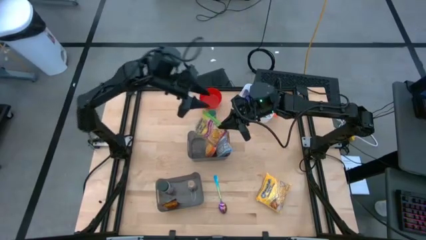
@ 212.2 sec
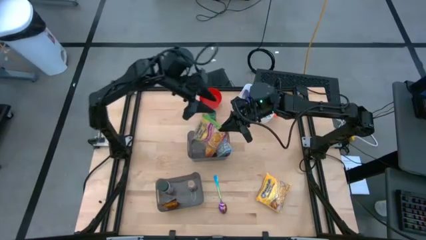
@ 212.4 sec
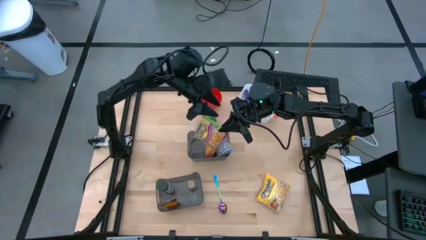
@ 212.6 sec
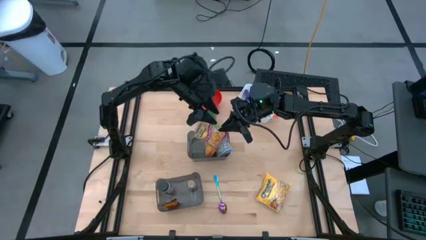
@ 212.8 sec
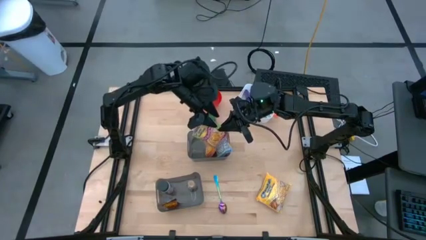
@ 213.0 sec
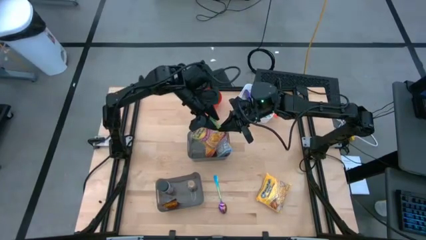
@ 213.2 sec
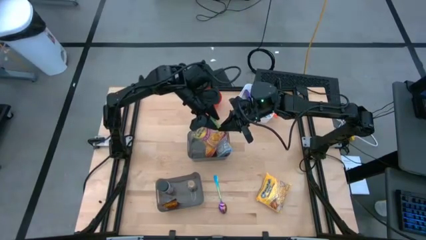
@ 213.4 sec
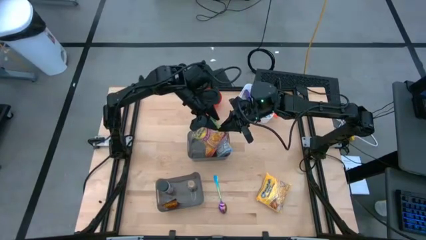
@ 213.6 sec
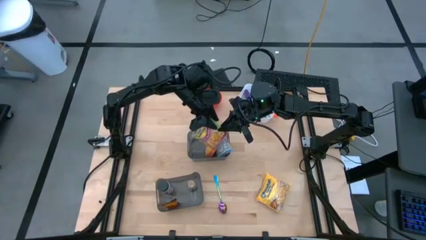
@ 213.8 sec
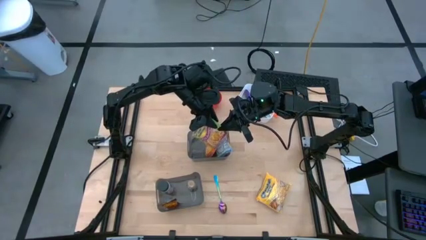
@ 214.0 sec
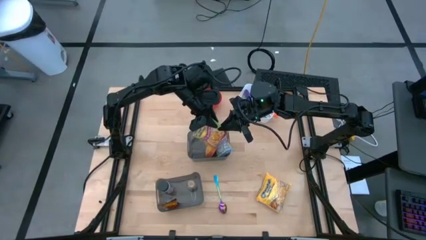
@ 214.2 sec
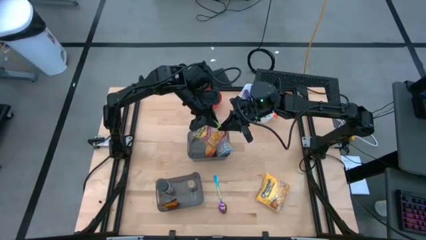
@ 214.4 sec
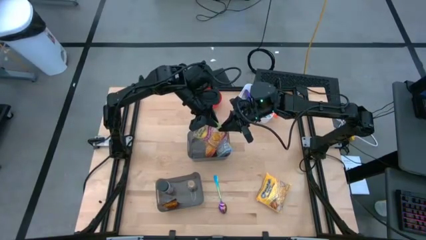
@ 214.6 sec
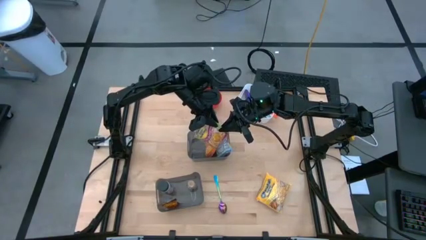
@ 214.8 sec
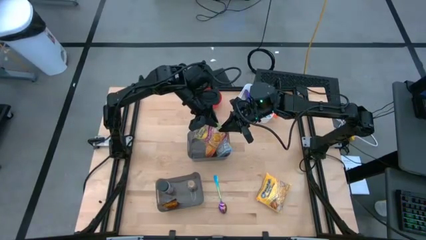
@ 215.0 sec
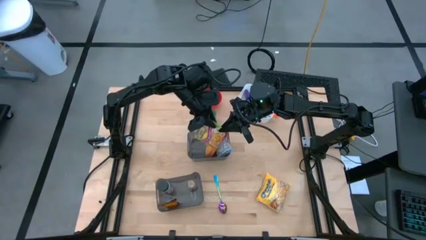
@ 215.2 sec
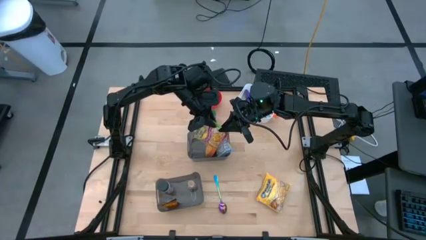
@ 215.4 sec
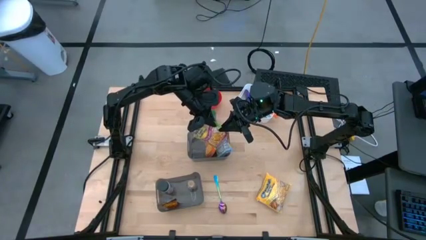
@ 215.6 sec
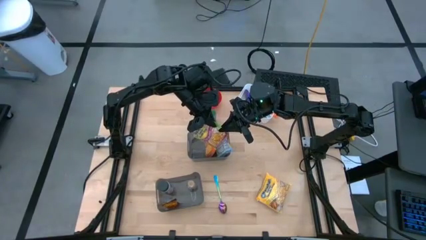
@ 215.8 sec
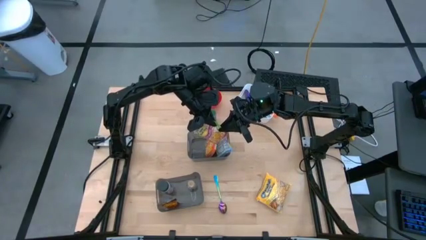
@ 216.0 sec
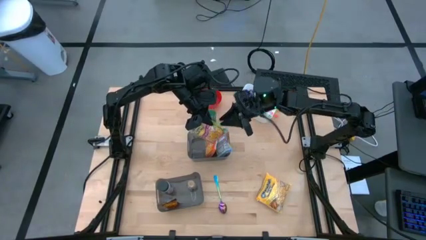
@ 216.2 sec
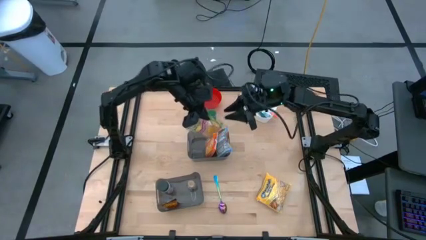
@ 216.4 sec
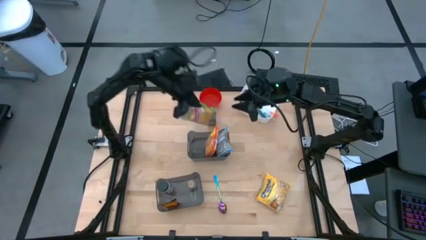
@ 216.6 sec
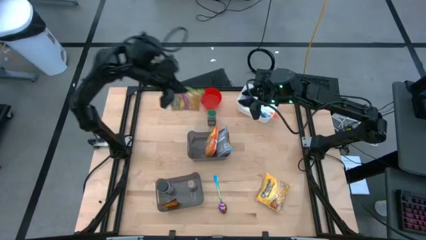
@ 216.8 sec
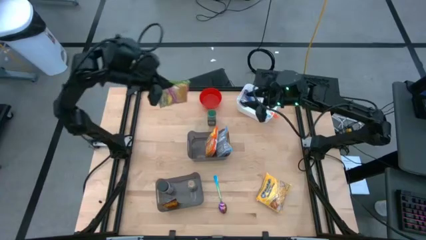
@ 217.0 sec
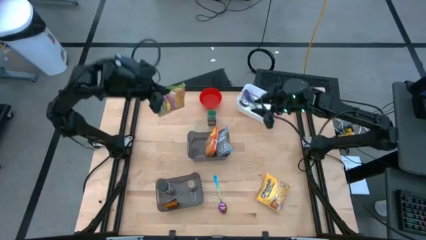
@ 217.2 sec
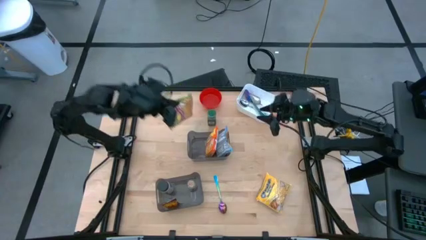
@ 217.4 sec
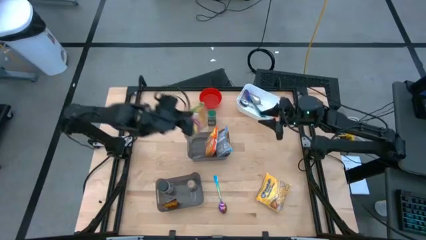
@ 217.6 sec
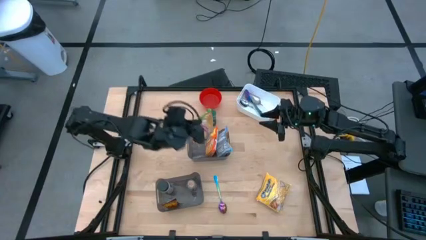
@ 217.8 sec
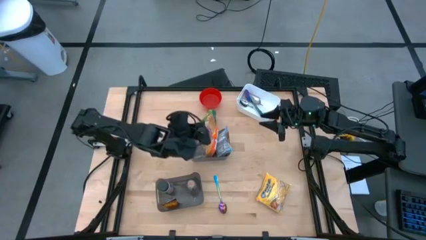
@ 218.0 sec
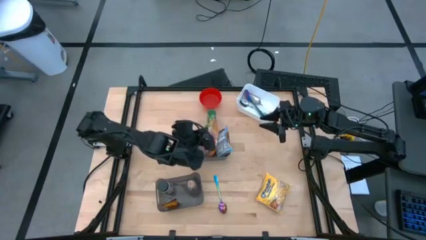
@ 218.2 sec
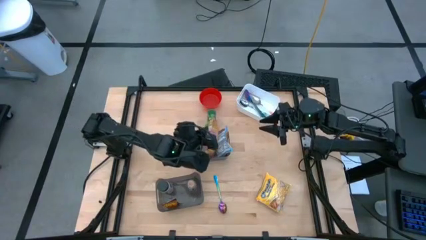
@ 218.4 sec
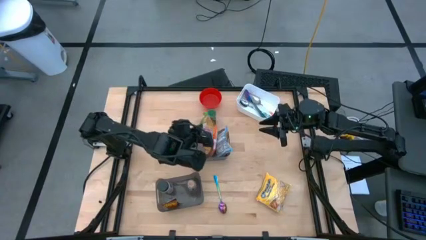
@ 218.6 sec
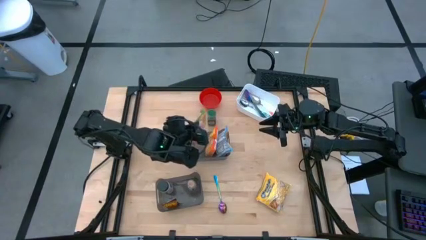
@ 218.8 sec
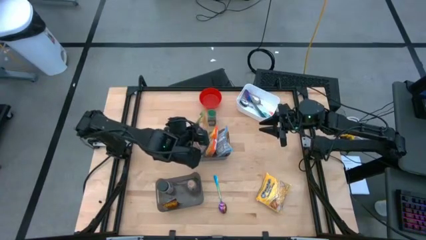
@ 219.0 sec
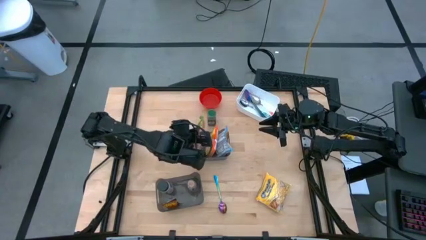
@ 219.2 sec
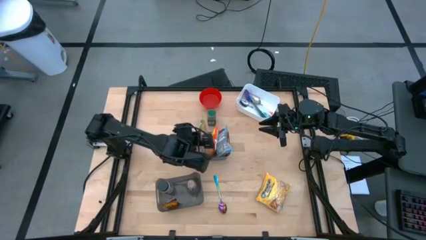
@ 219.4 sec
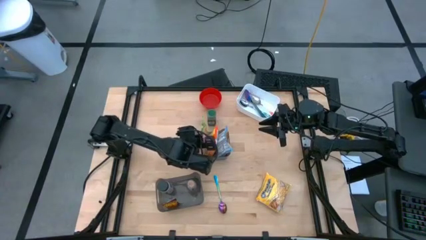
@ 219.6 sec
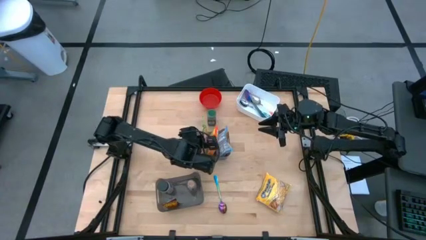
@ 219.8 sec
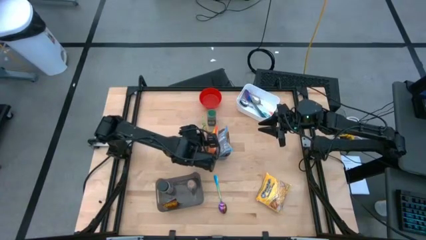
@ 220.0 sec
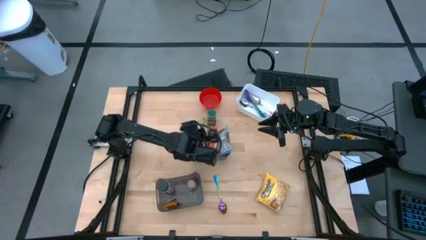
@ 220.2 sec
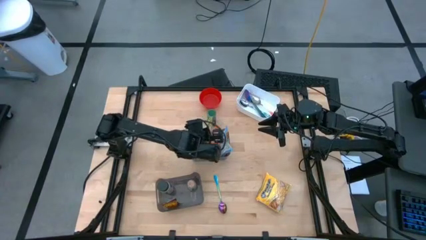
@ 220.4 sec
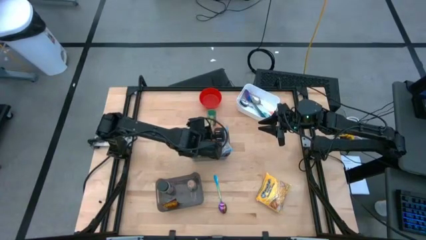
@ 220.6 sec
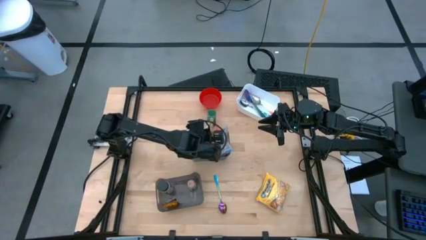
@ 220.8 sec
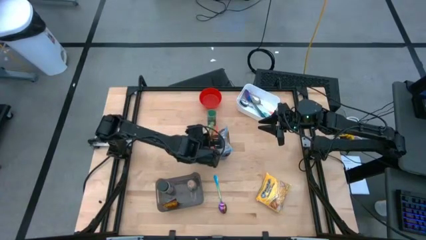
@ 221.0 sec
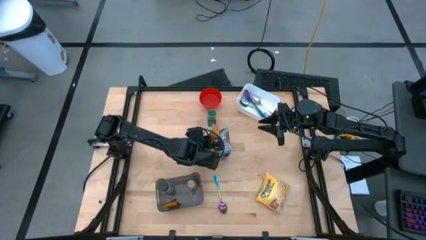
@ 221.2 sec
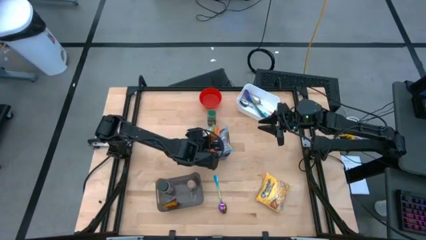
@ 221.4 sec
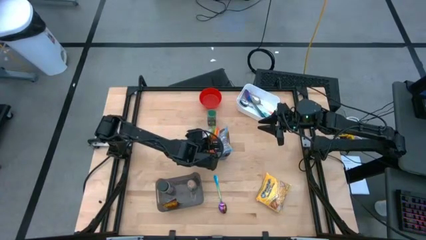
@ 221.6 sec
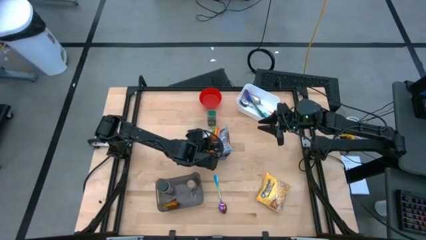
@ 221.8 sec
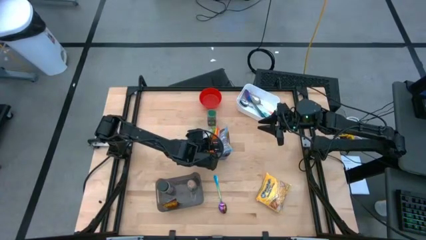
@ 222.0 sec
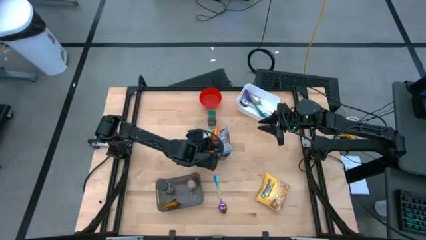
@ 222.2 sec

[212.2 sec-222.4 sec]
Task: Pick & Place Food Item
Put the green noodle pack into the top black bin

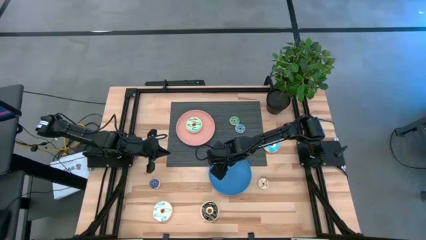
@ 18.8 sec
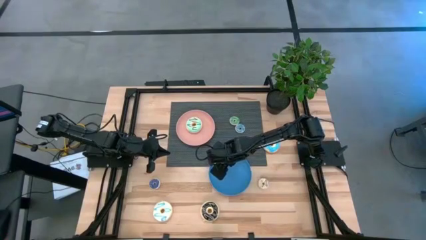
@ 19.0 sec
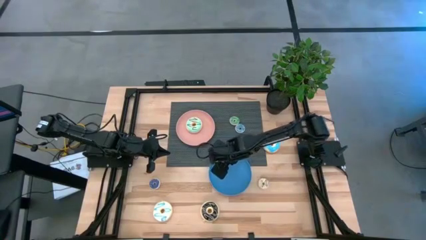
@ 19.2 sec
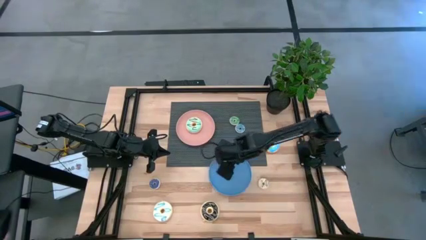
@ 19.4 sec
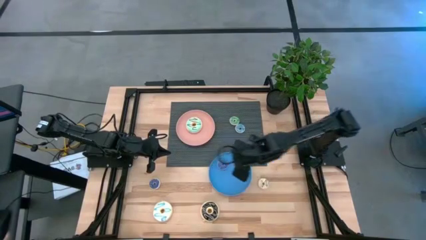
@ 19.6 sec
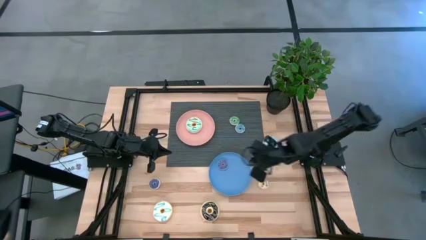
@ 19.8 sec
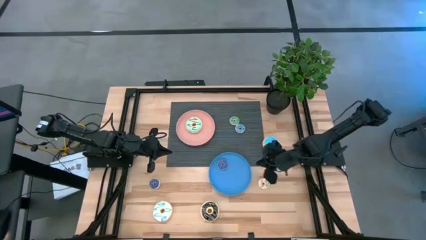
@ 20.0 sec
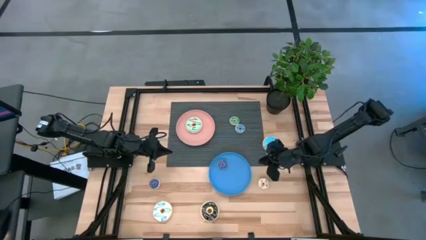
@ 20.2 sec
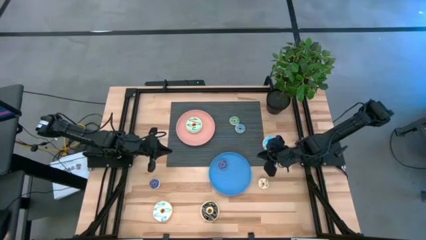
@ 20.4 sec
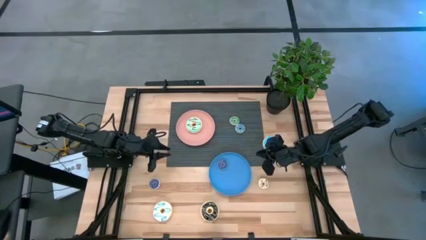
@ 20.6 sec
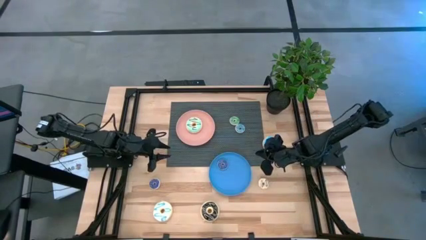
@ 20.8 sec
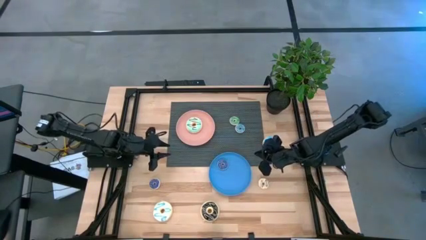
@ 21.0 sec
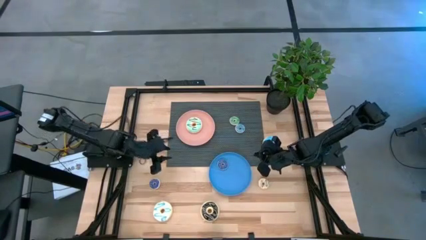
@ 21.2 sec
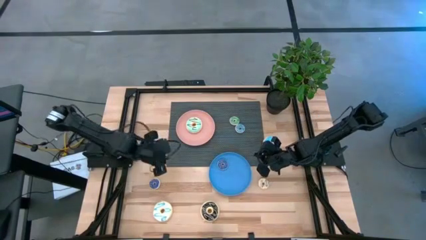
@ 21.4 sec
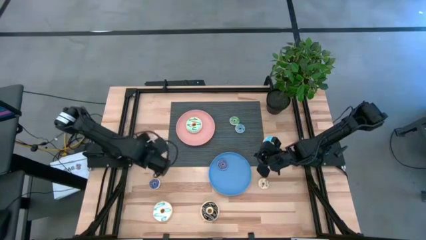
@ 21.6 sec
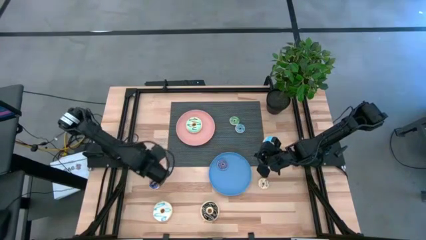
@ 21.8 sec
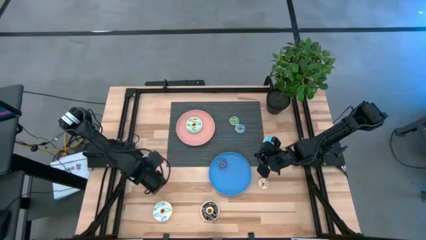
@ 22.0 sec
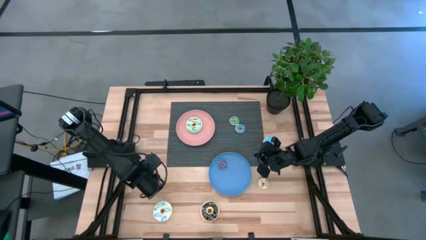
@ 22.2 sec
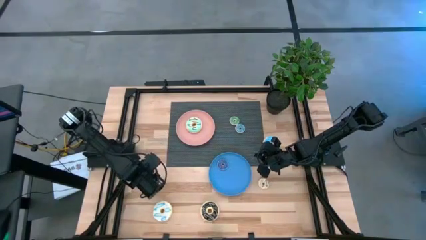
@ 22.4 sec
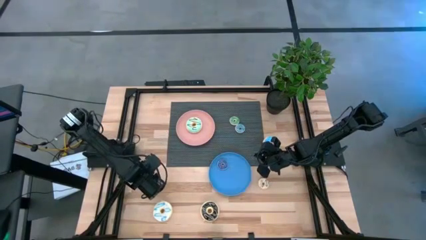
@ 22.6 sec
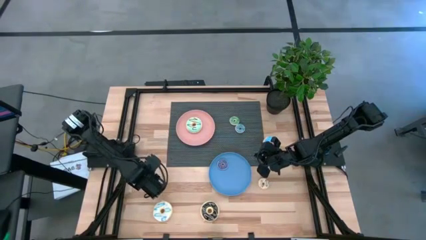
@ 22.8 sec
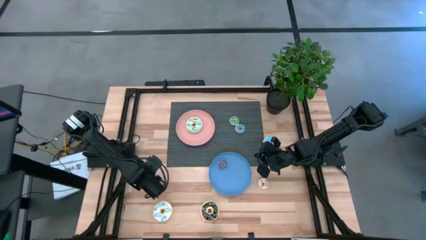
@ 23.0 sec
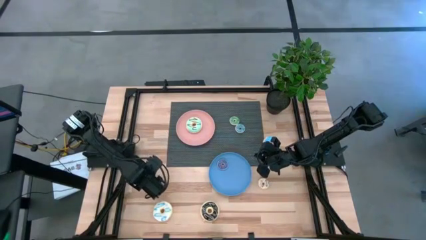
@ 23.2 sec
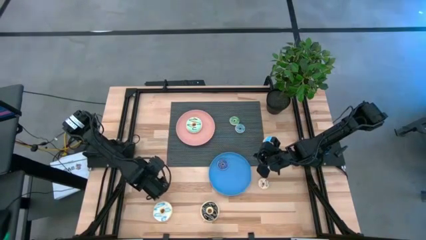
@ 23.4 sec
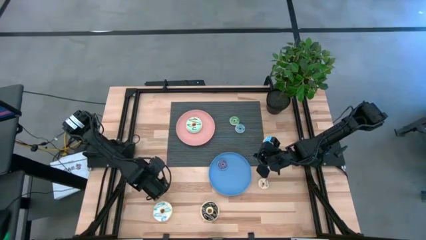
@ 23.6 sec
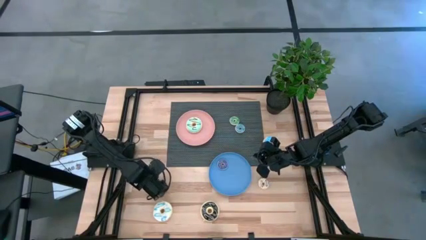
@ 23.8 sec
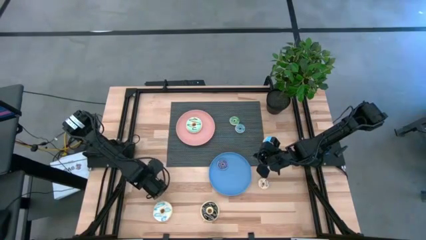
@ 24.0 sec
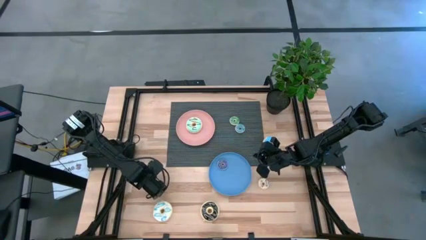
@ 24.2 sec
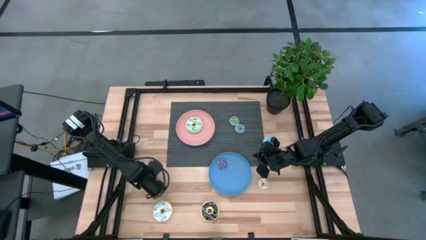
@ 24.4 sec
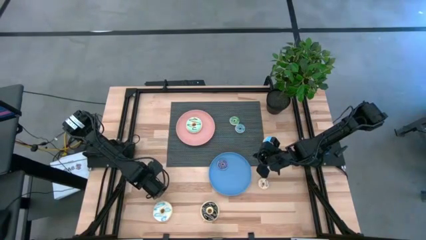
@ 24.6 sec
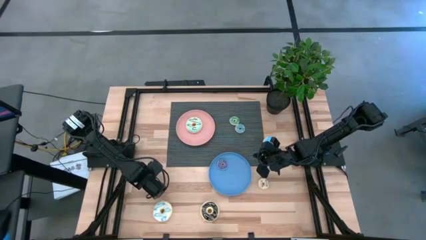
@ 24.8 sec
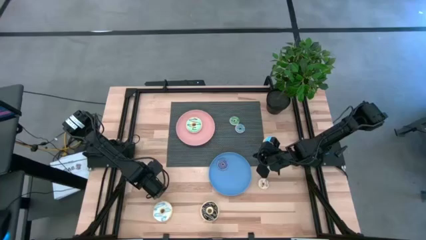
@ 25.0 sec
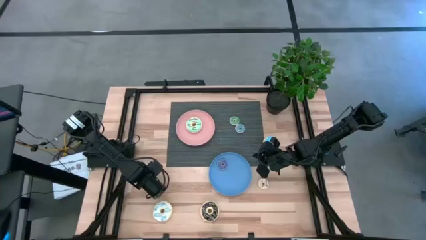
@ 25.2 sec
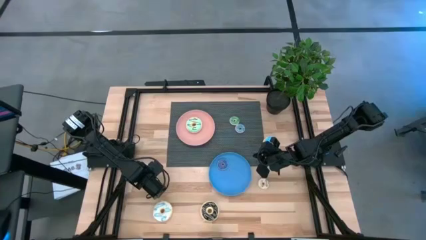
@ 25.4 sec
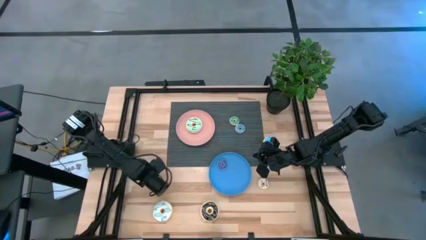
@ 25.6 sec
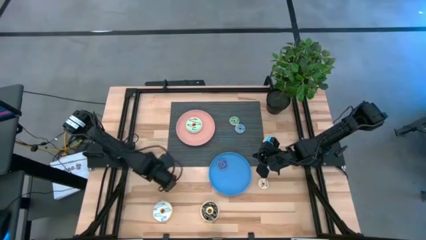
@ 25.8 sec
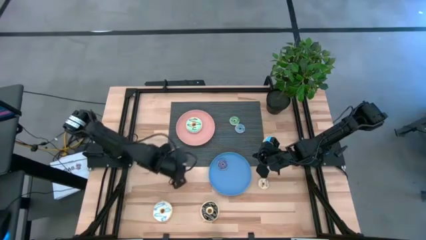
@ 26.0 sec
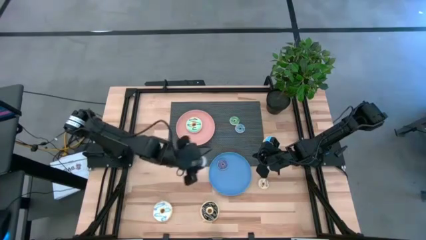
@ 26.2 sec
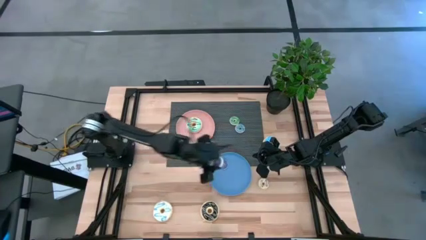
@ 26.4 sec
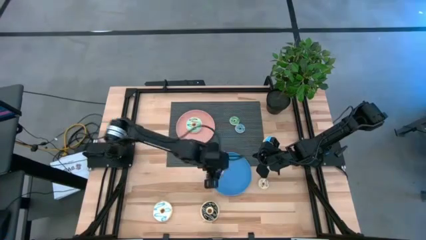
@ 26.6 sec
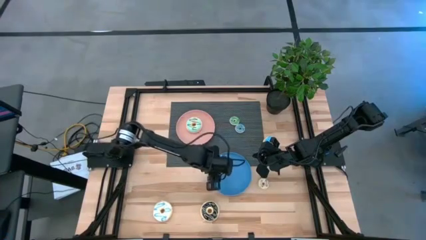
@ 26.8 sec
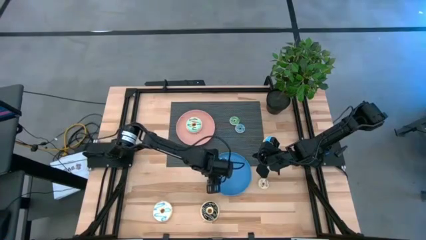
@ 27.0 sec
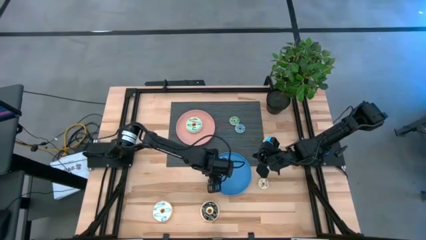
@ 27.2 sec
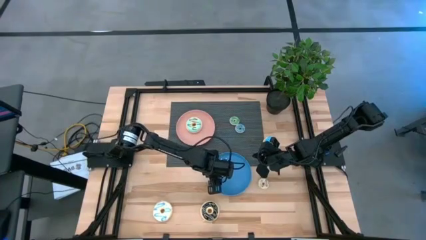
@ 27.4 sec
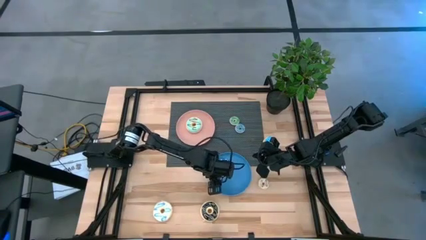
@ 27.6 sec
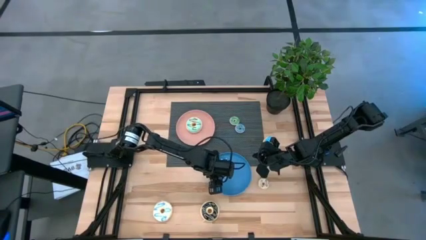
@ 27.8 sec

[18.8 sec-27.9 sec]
Task: Pick & Place donuts
Put the small blue donut into the blue plate
